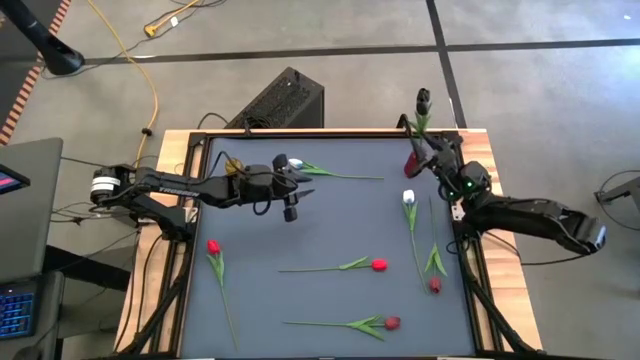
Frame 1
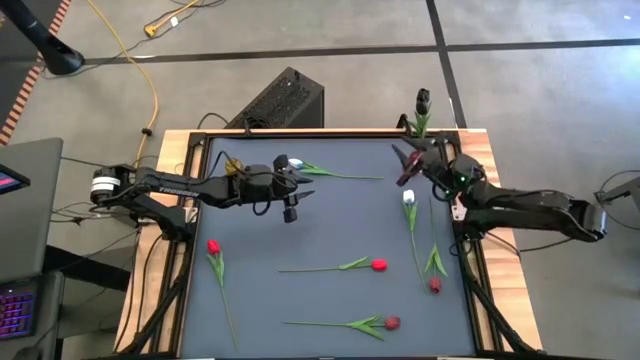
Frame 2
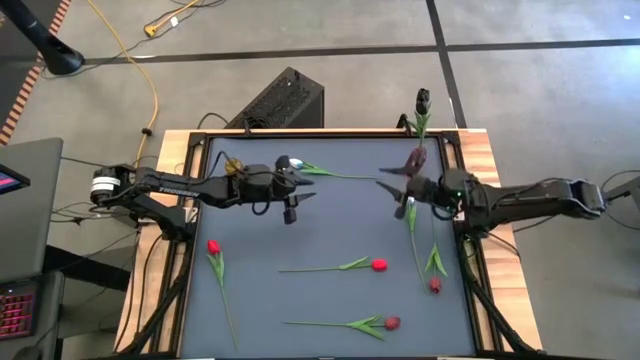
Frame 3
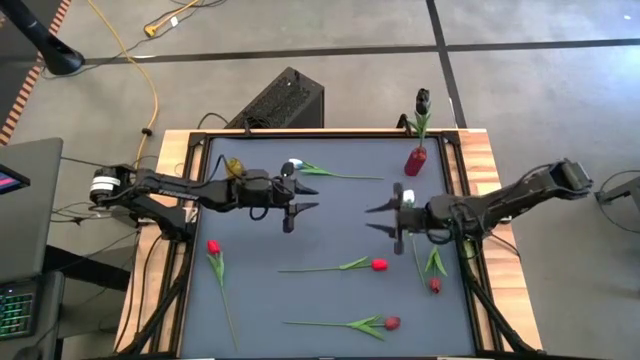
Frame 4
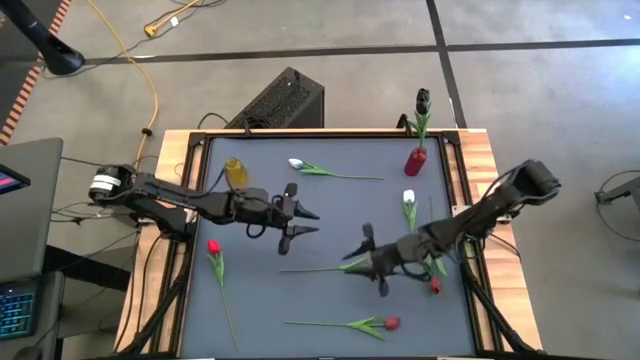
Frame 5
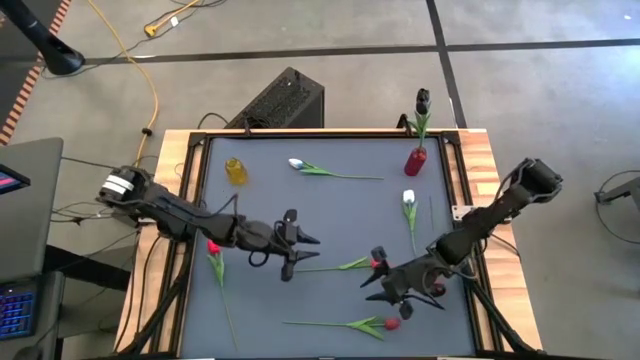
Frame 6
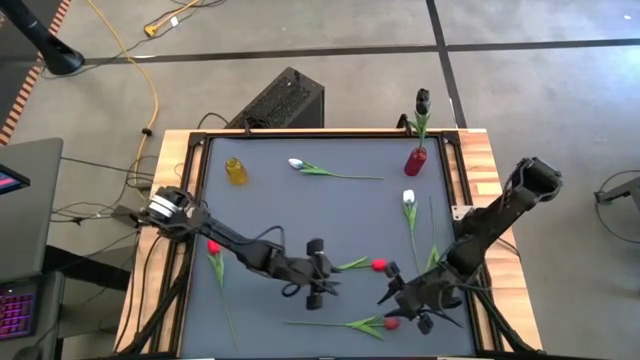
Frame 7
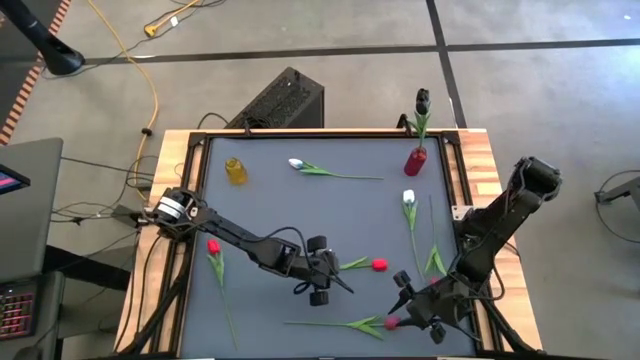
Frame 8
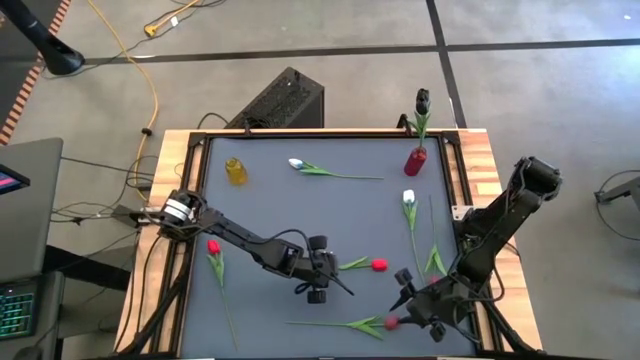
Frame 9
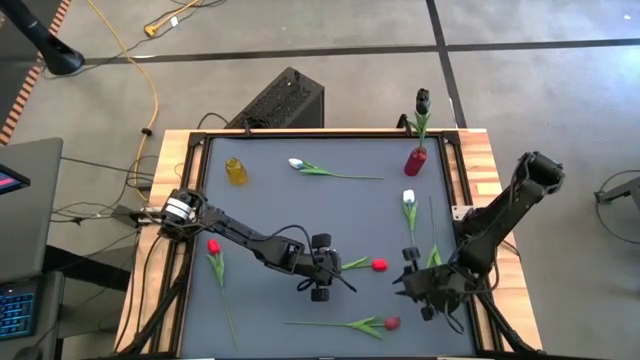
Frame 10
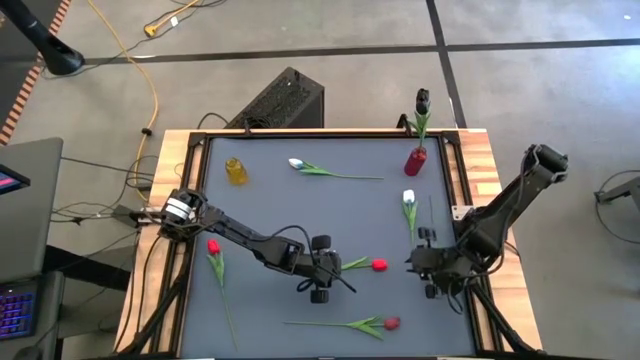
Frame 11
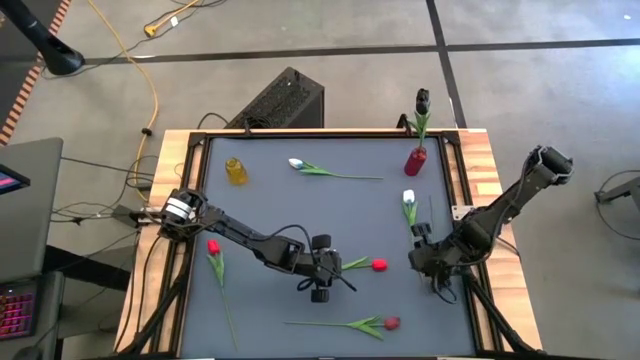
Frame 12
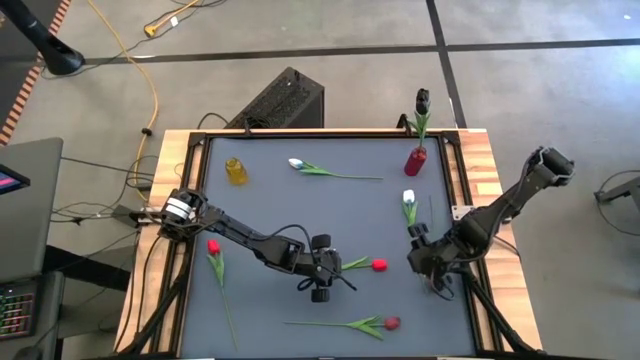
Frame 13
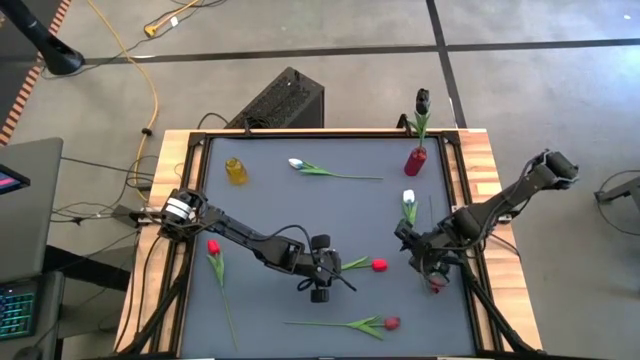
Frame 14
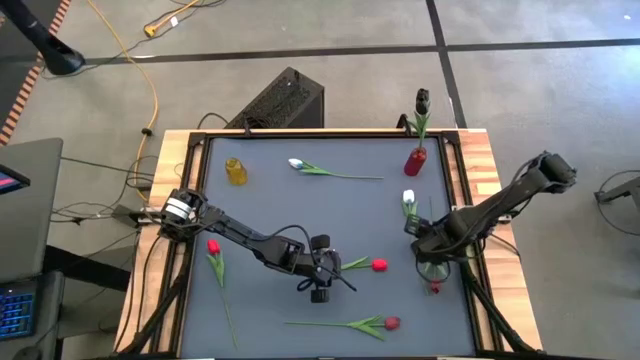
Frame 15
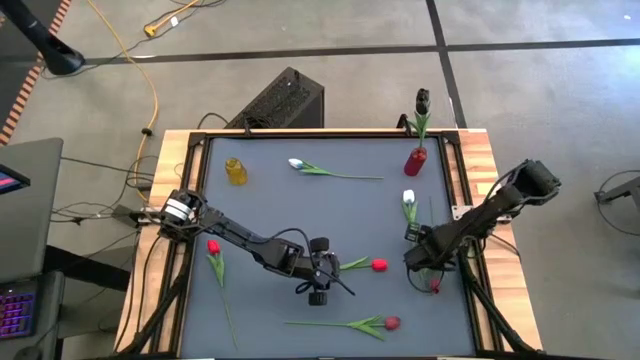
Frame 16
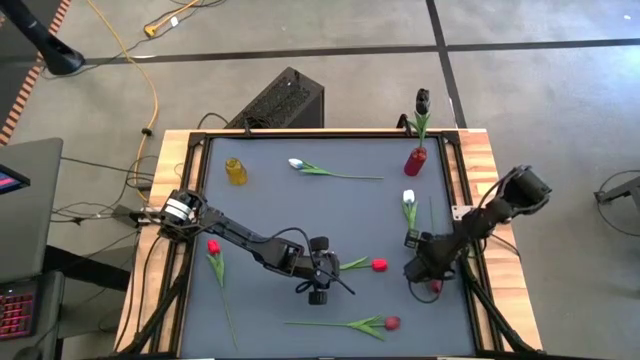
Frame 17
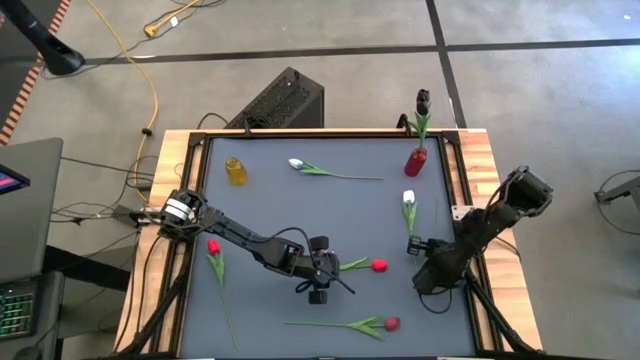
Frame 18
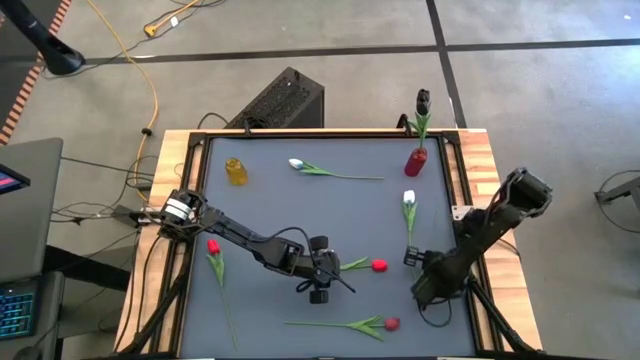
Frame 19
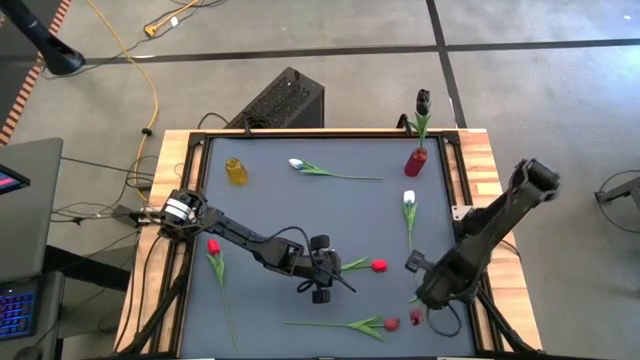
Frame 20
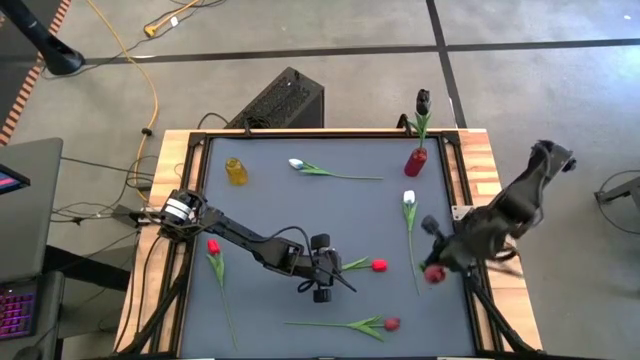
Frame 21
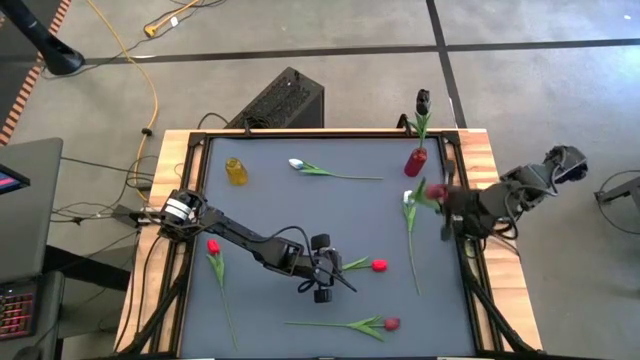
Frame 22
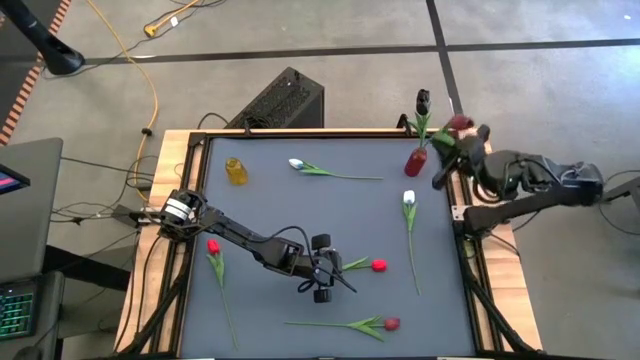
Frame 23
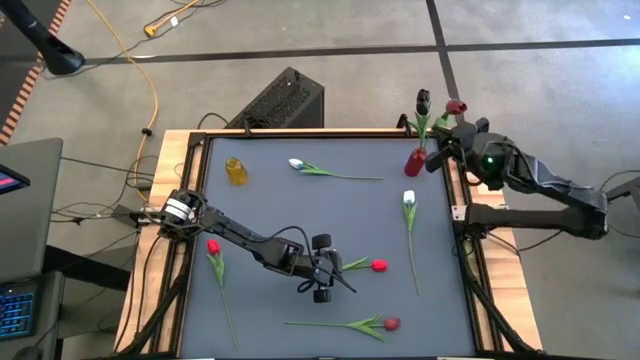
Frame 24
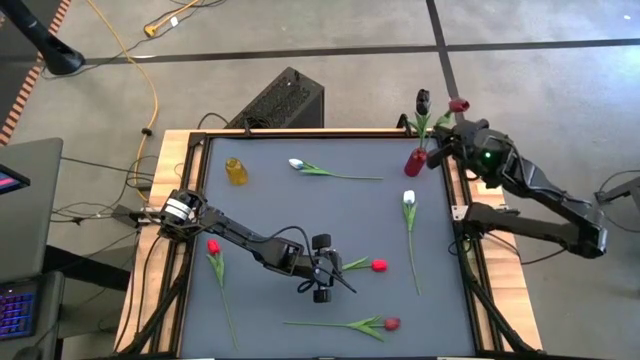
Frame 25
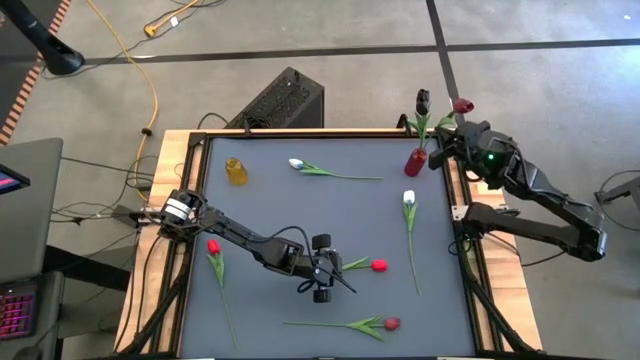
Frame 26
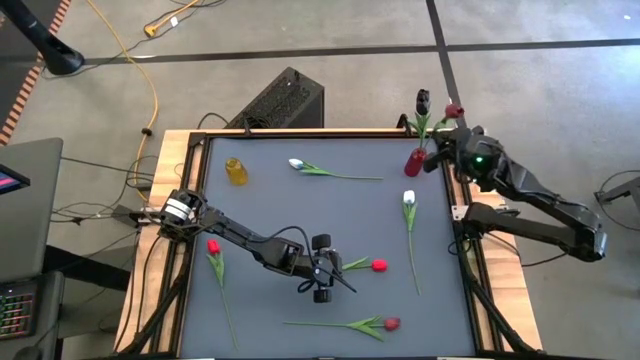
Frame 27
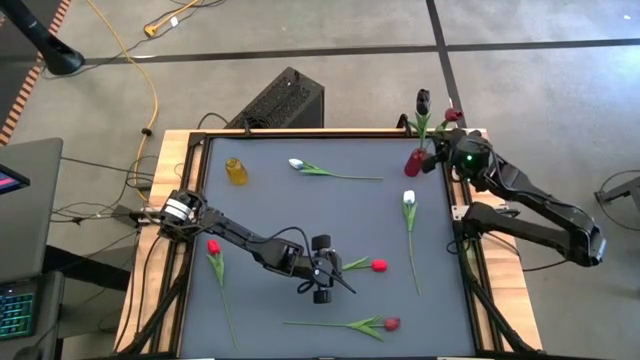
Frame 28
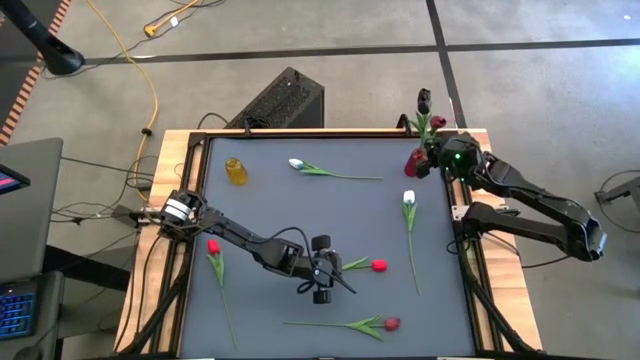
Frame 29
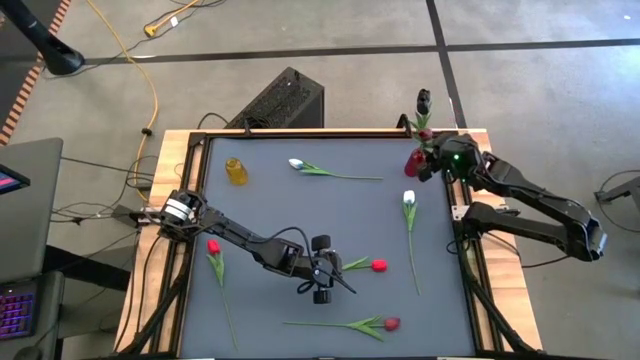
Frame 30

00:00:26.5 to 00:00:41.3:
Task: Sort flowers into vase by color
Put the top dark red tulip into the red flower vase

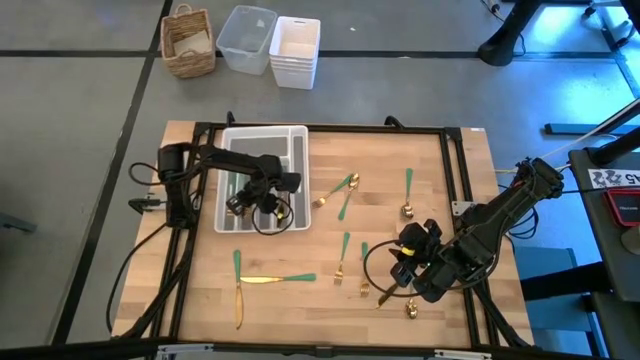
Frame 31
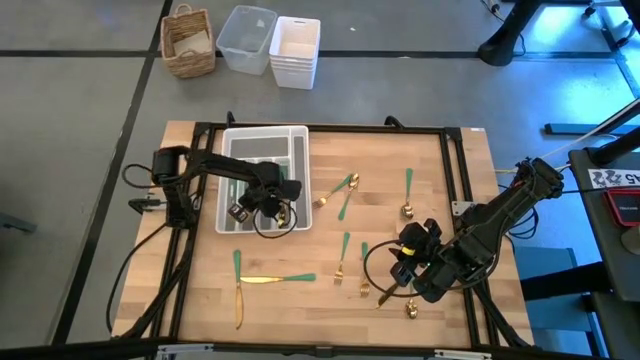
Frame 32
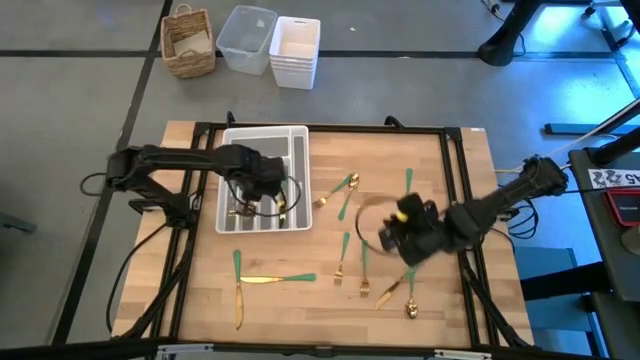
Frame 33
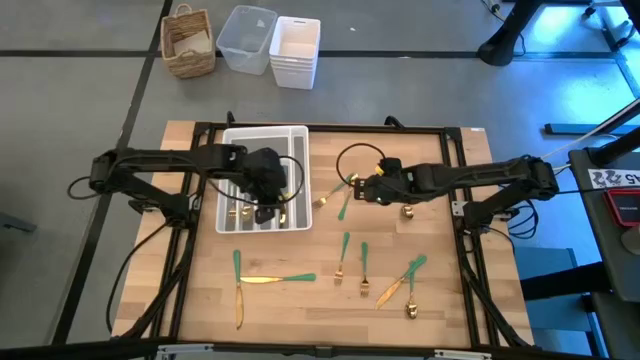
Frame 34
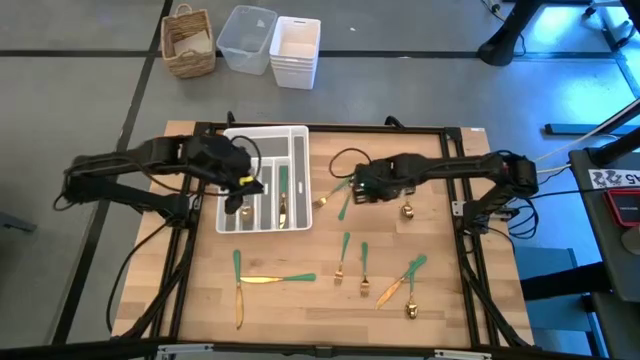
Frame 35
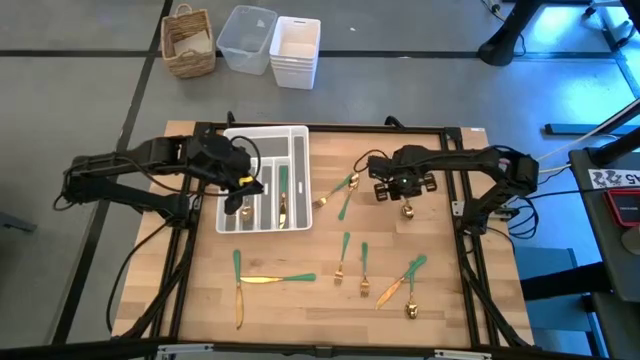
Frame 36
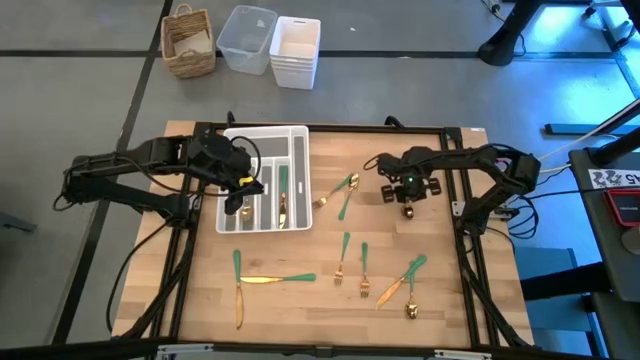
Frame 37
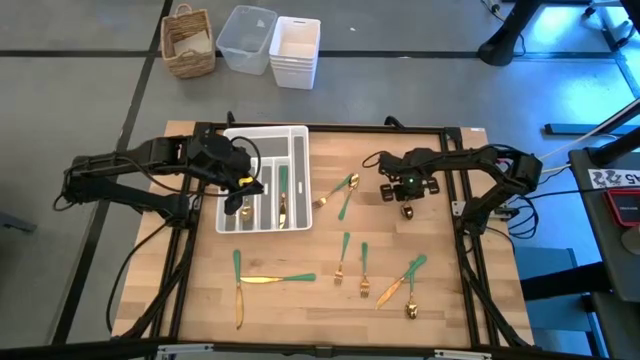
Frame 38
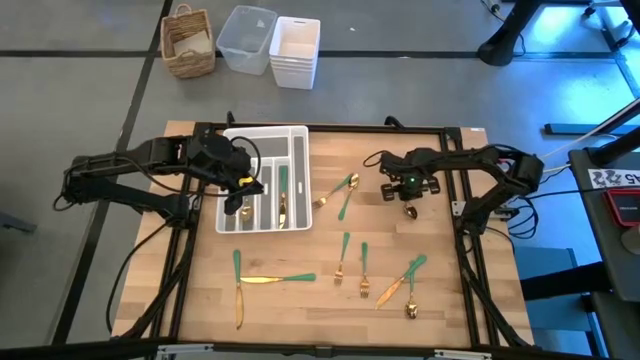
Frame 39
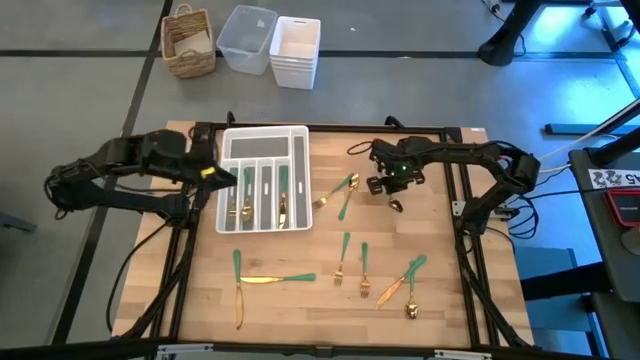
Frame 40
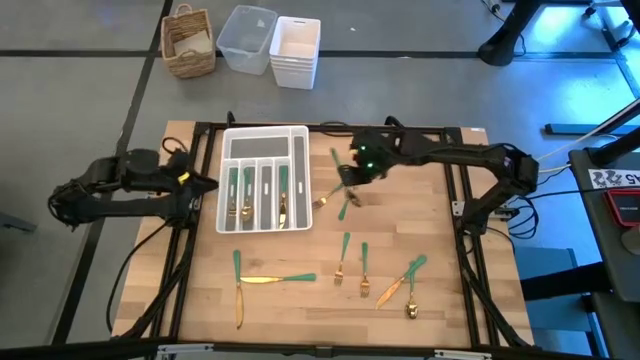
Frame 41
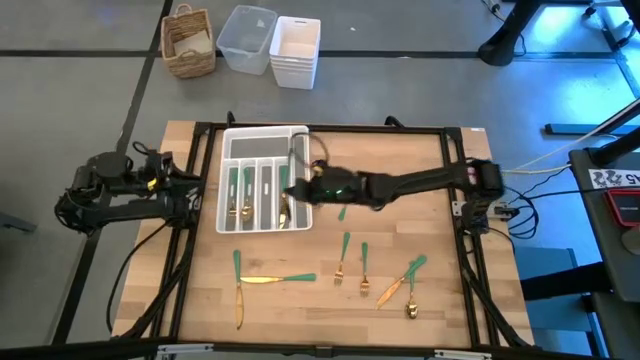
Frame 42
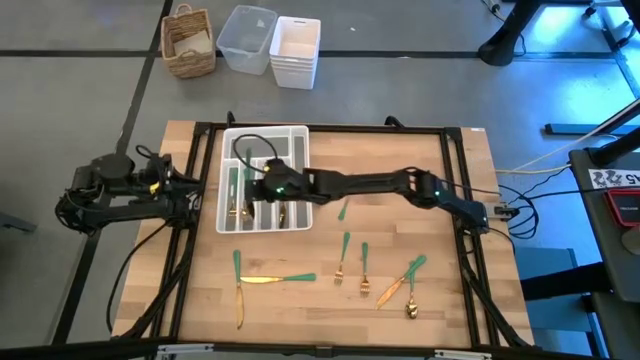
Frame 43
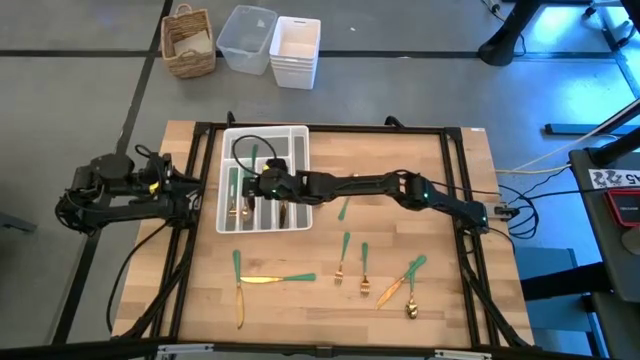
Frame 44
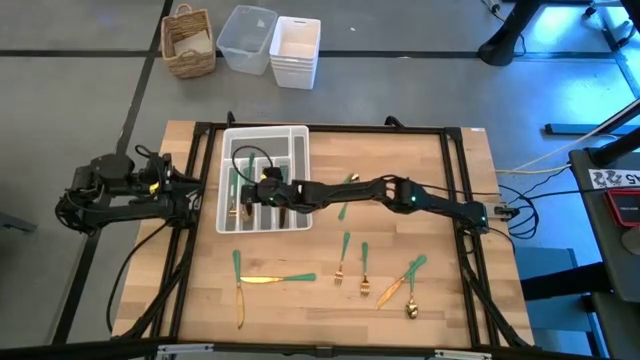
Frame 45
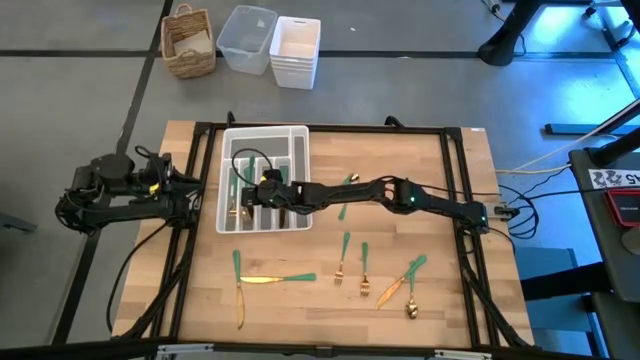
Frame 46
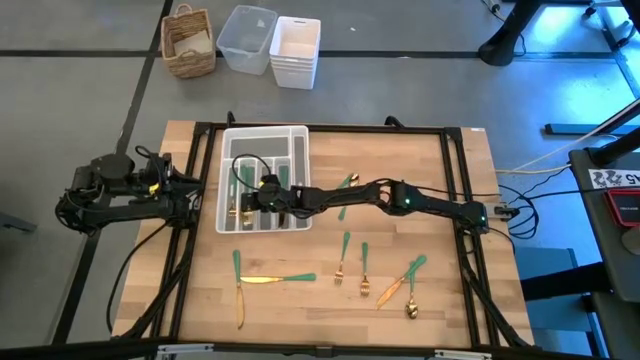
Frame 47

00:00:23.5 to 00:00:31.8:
Task: Sort silverware
Put the green spoon into the white silverware tray
